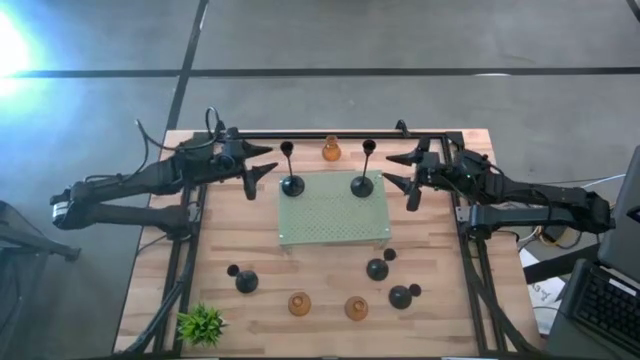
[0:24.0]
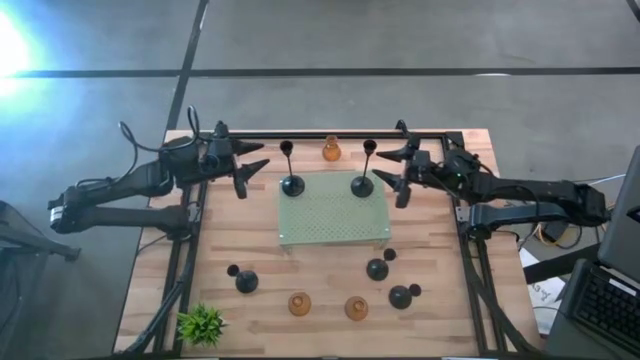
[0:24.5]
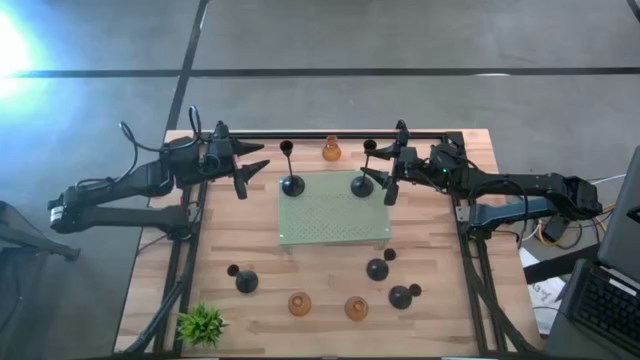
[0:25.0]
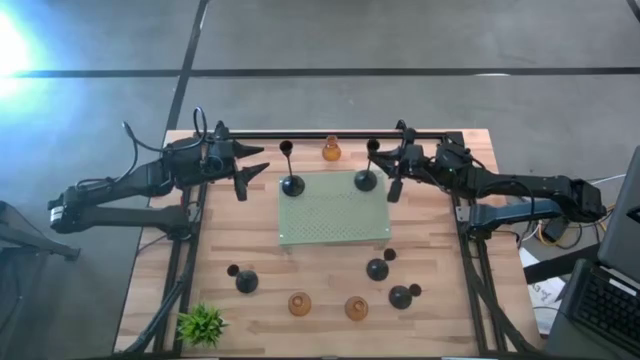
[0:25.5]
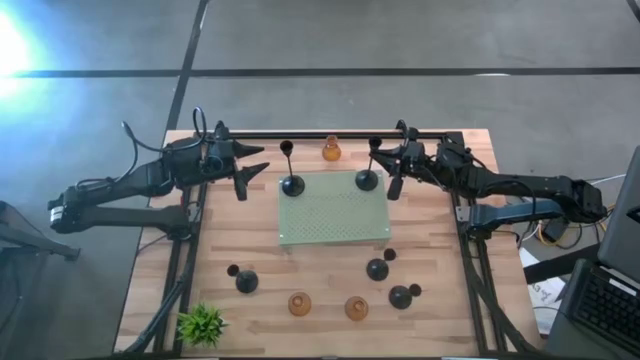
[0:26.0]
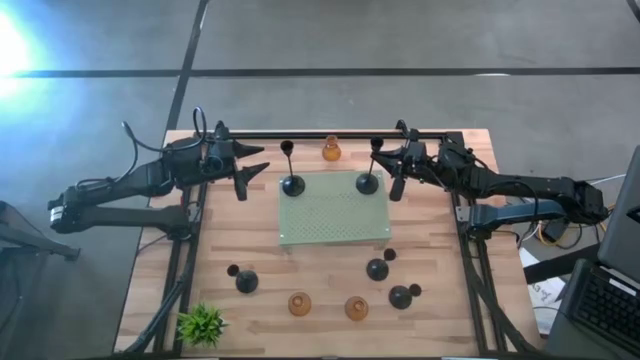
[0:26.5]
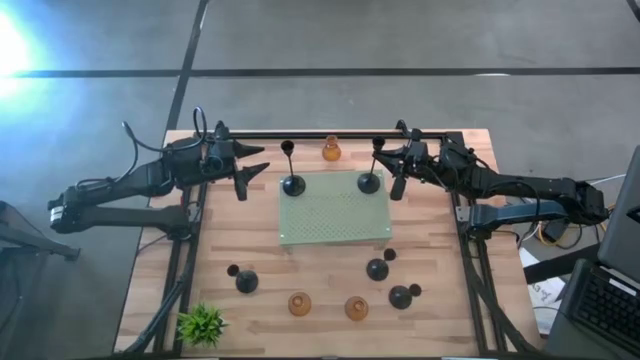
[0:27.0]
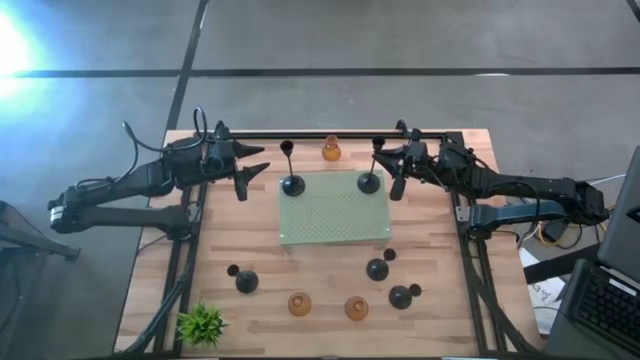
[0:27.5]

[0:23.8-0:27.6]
Task: Pick & Place candle stick holders
Adjust the right large black candle holder on the shelf

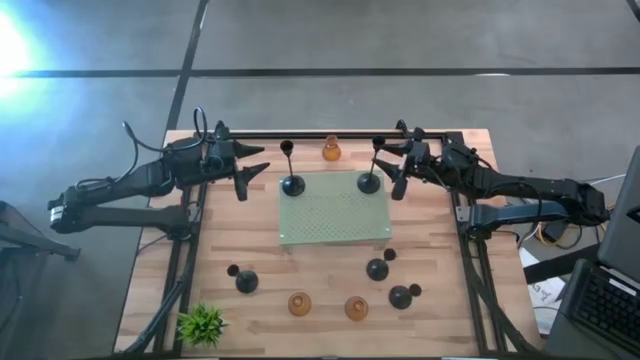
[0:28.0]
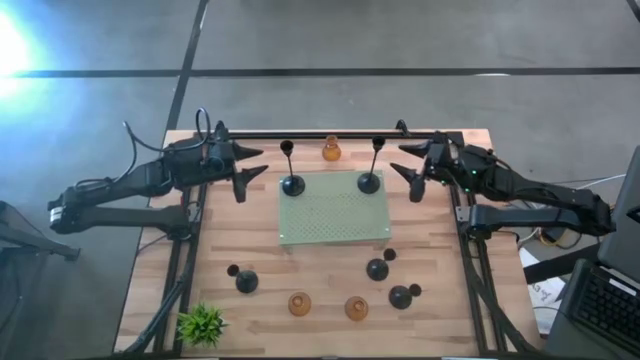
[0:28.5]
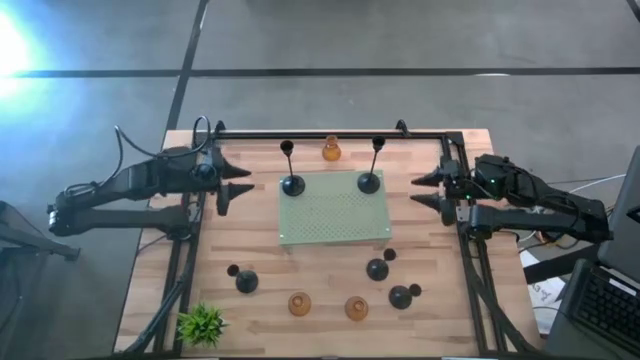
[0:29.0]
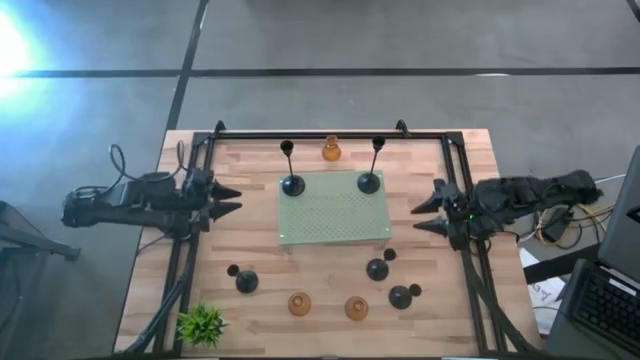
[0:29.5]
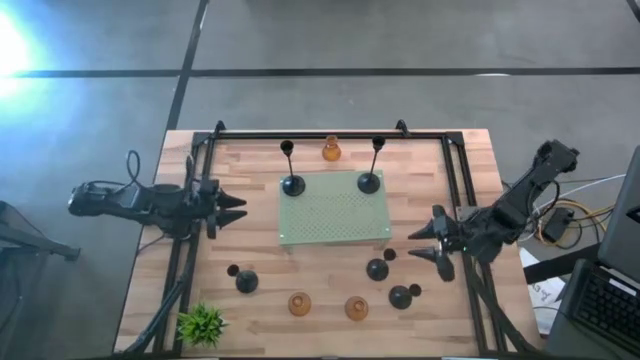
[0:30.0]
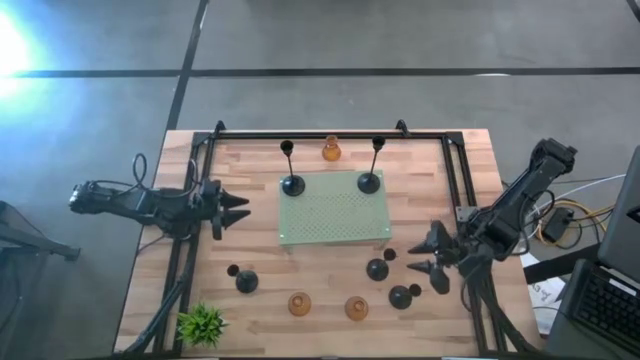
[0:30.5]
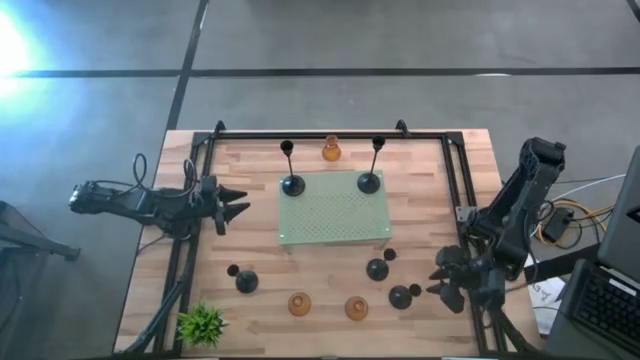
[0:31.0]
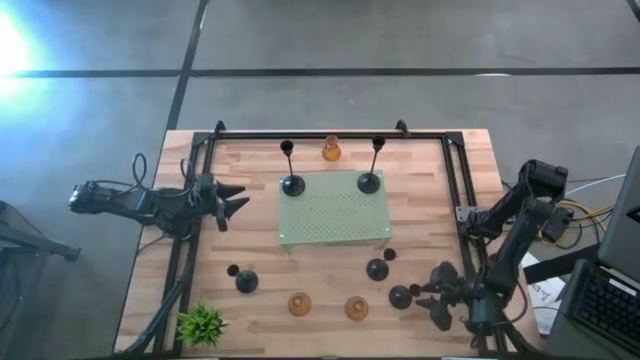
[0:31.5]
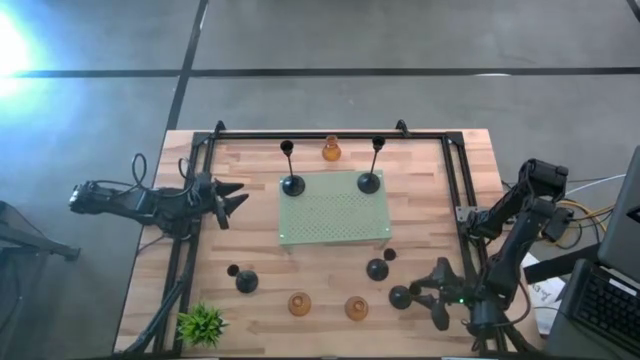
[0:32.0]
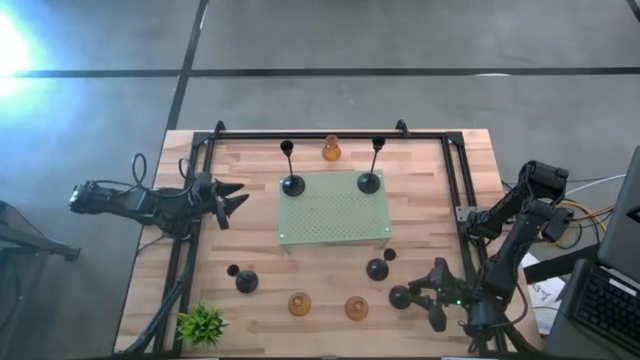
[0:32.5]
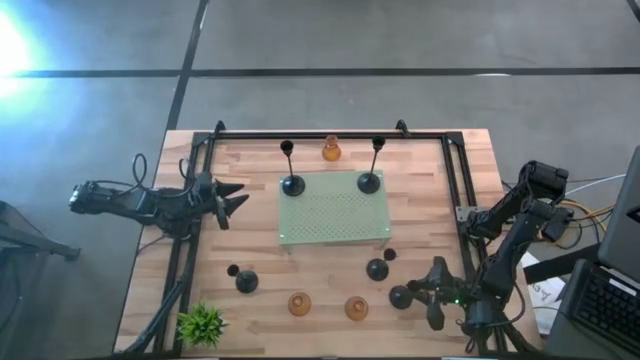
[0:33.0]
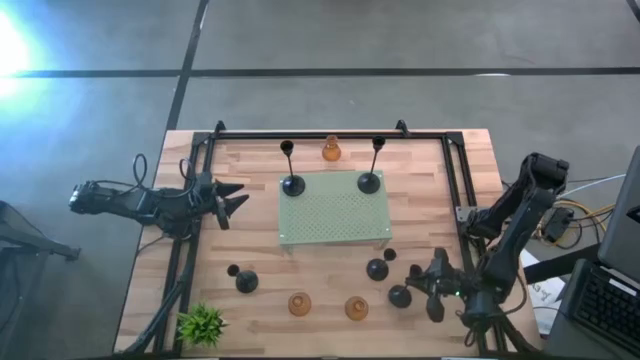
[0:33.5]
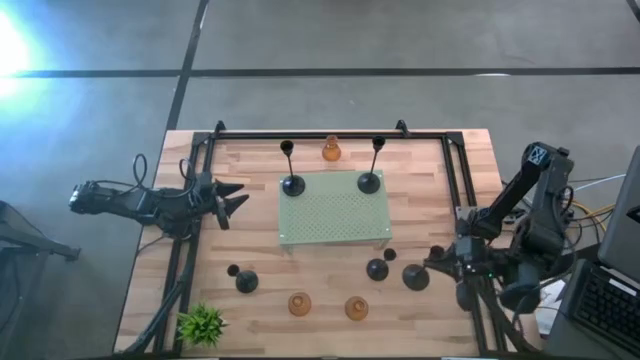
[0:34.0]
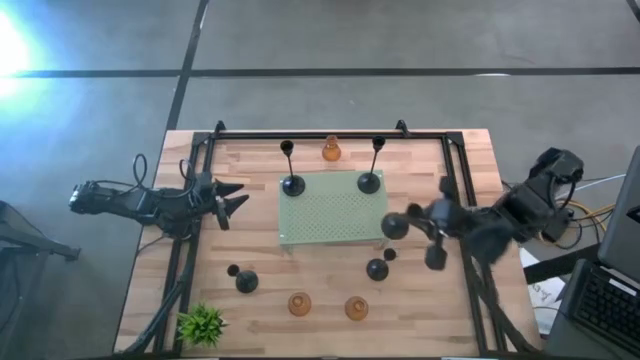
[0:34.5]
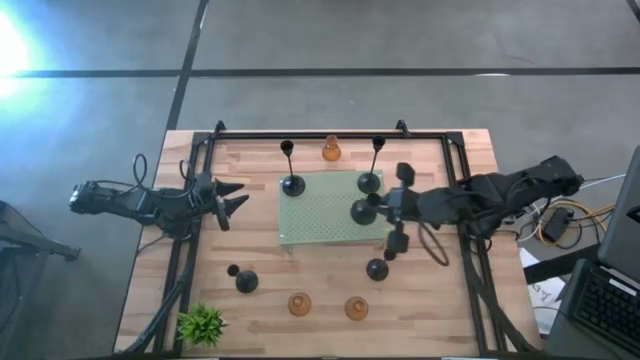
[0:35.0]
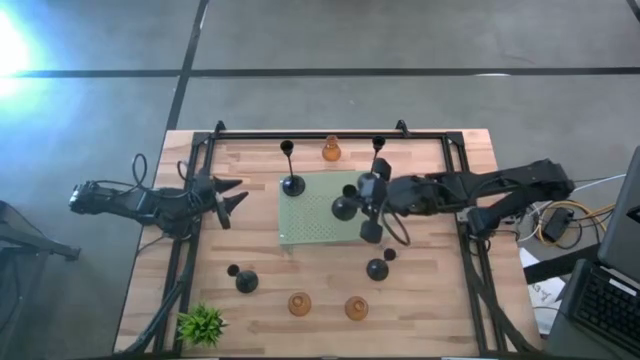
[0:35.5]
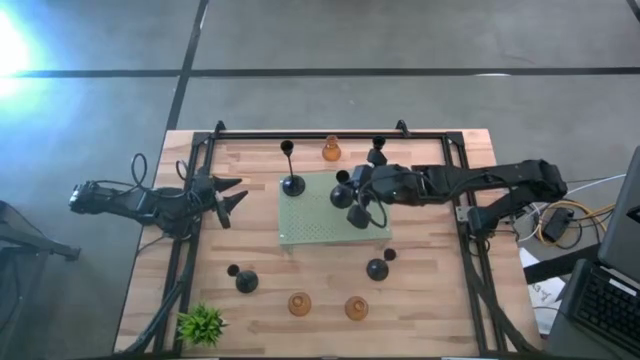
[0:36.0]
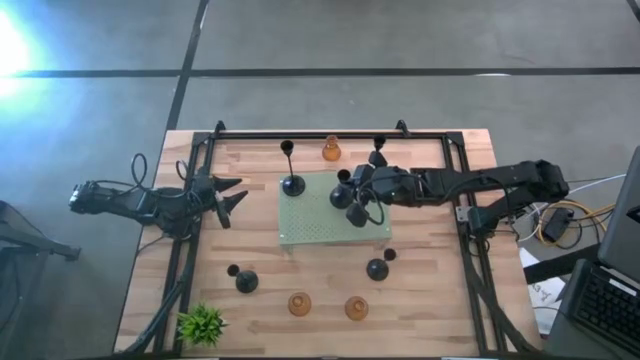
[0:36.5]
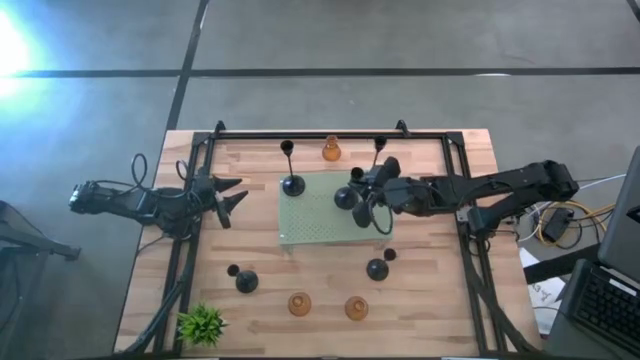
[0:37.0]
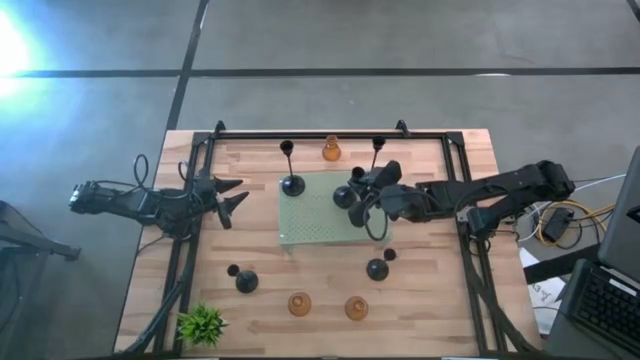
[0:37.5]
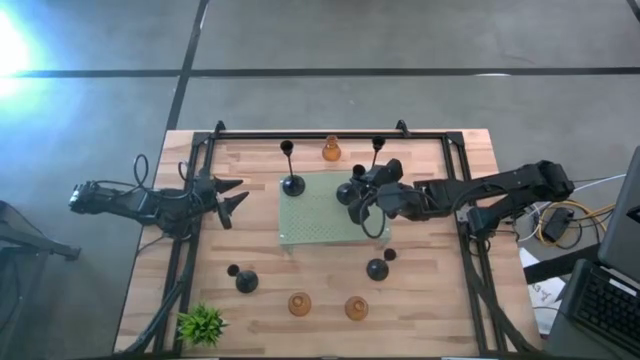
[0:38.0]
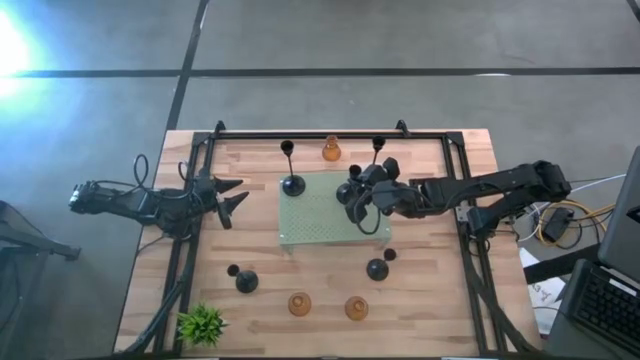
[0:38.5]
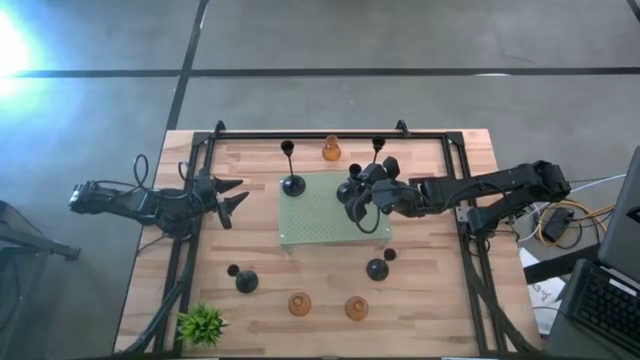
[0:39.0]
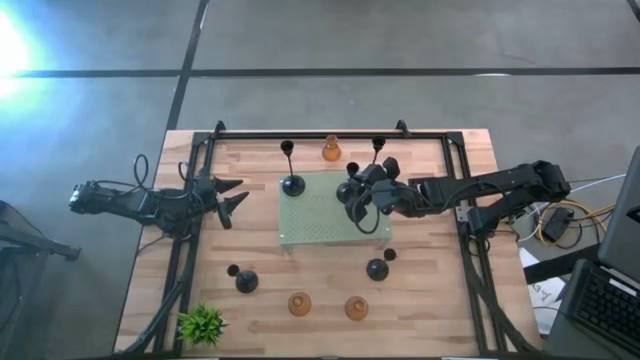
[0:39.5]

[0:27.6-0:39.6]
Put the right small black candle holder on the shelf

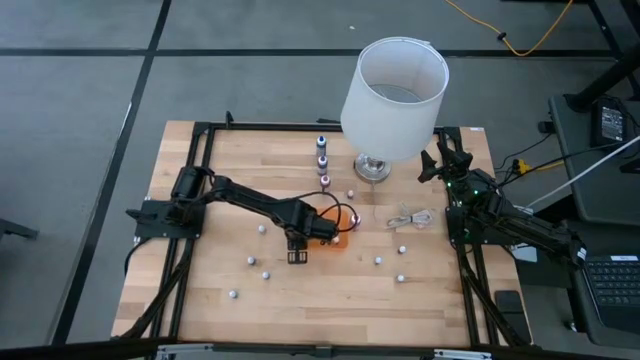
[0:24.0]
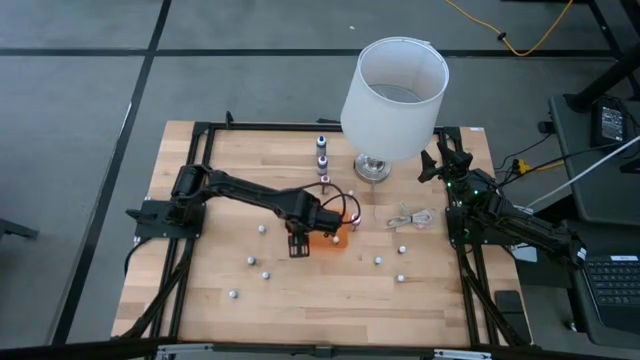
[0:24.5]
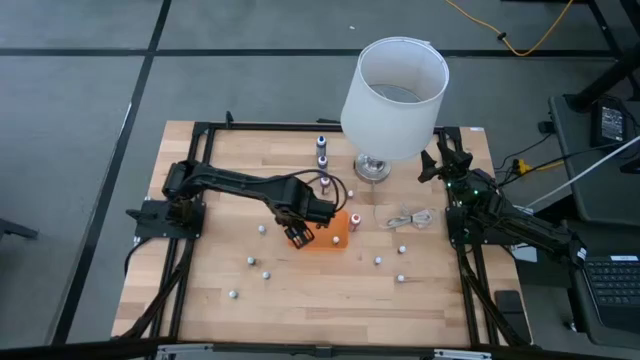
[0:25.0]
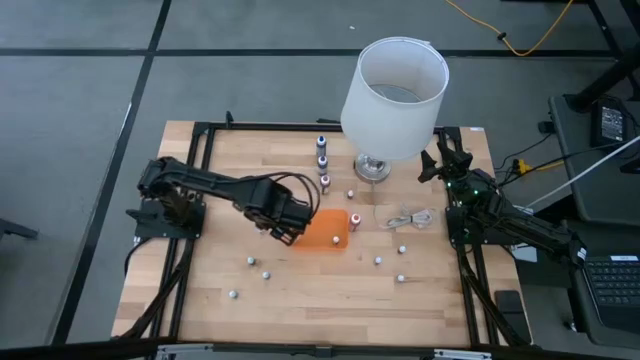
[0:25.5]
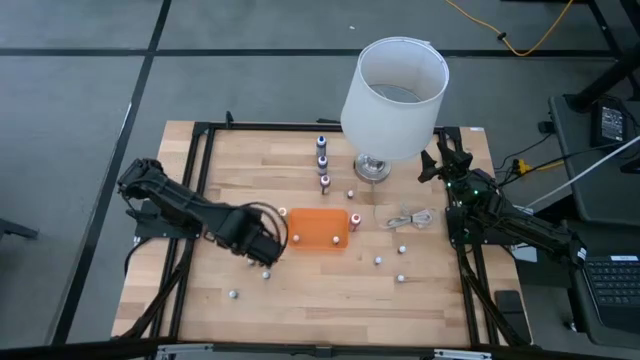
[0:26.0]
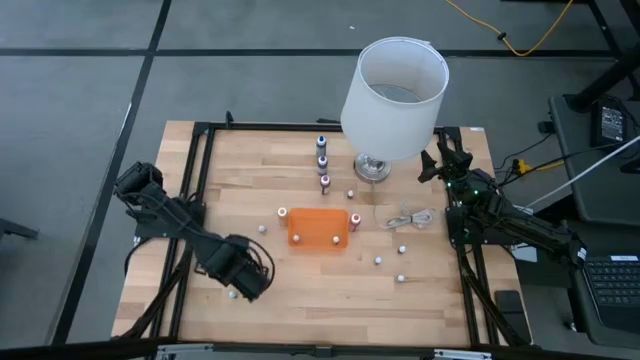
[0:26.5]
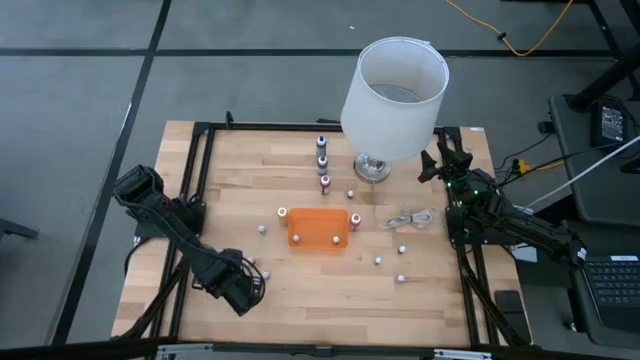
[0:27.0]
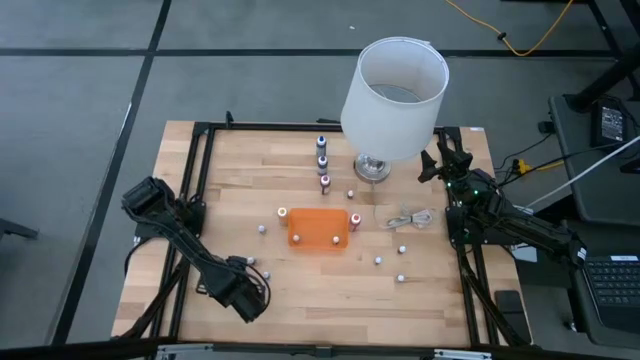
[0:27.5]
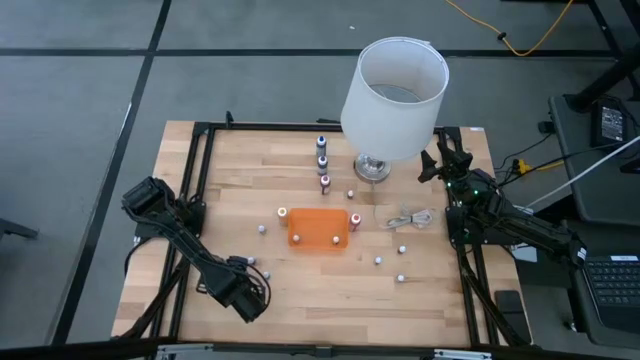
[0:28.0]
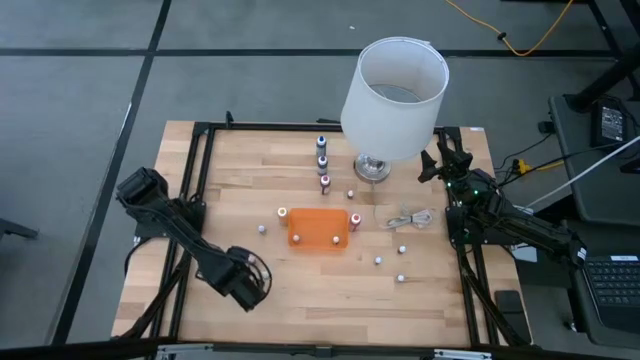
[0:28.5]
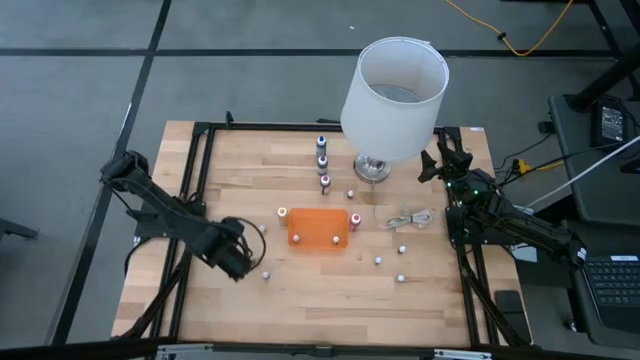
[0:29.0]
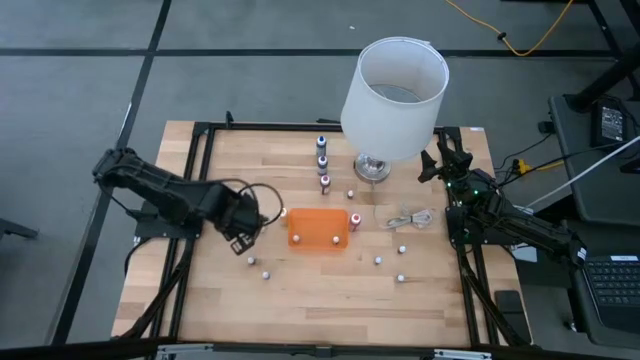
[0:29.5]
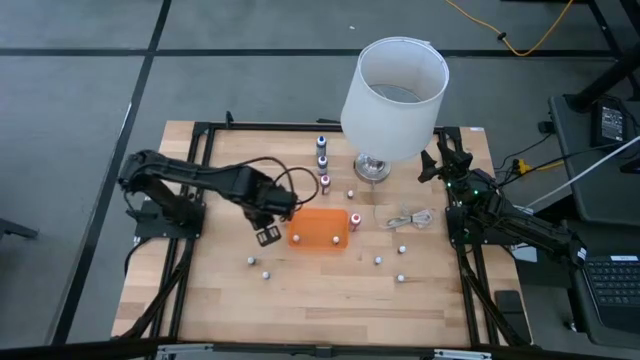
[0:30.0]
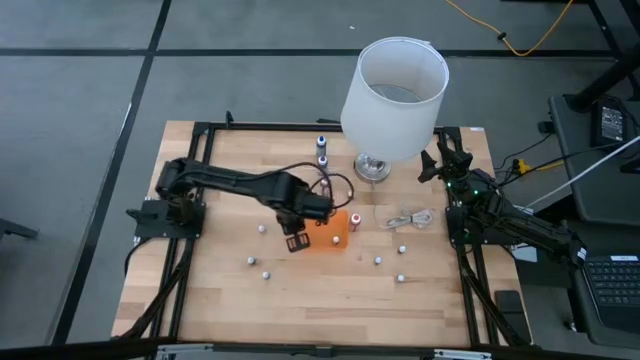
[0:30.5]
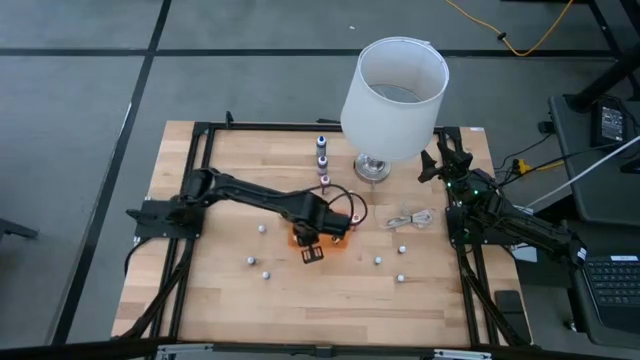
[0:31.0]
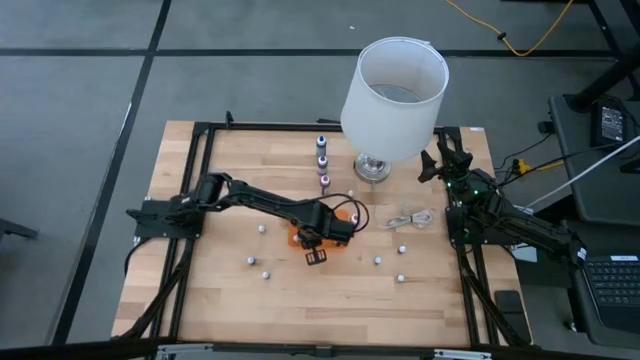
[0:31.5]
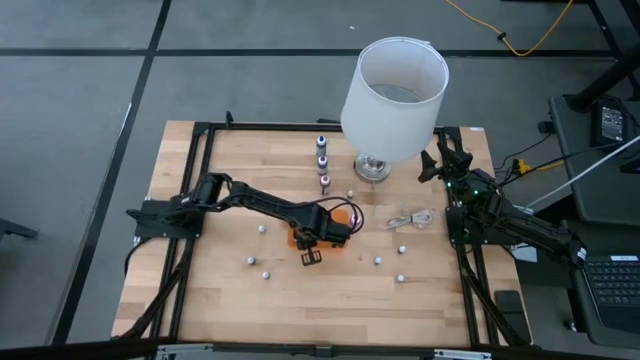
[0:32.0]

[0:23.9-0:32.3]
Task: Pick & Place food coloring
Put the left small black food coloring bottle into the orange bin
